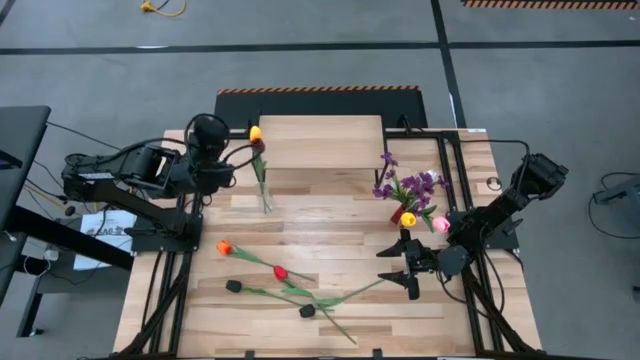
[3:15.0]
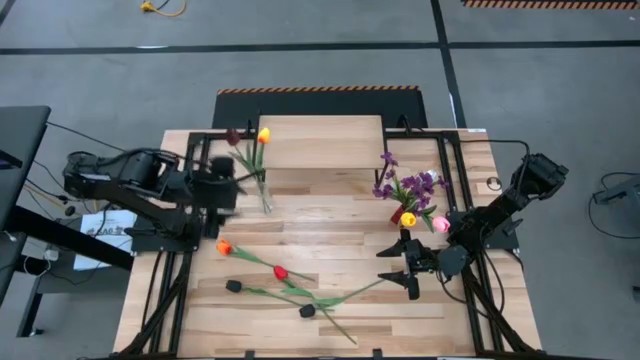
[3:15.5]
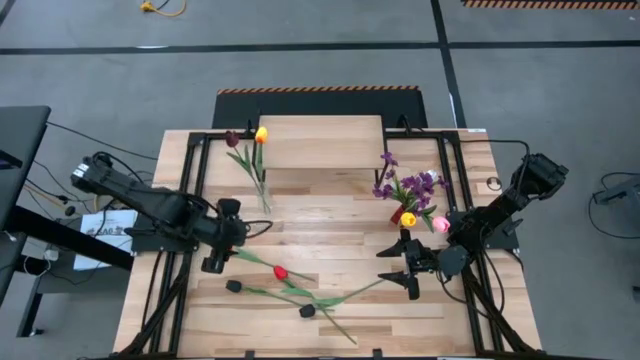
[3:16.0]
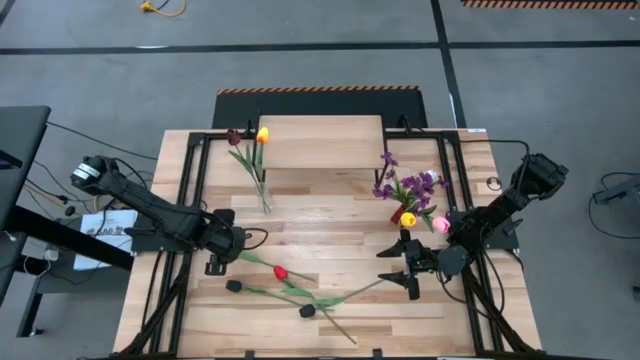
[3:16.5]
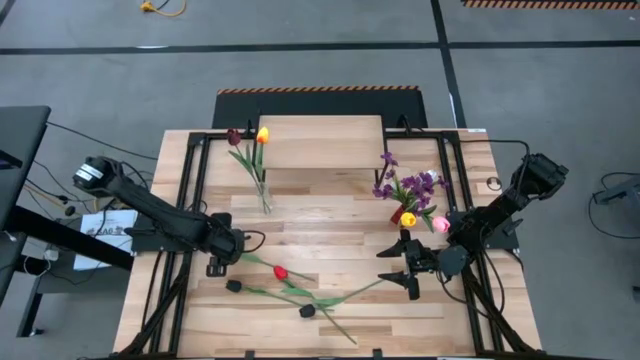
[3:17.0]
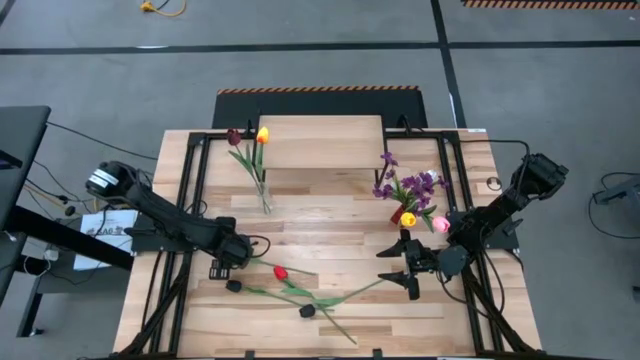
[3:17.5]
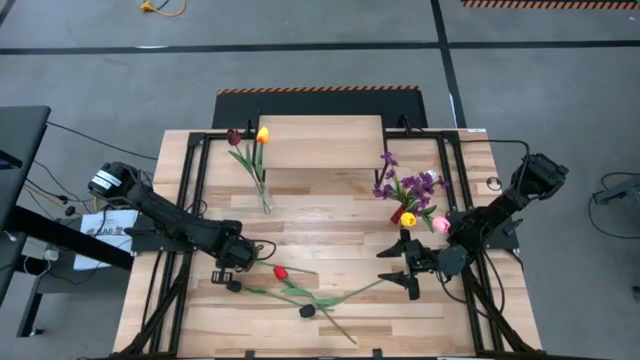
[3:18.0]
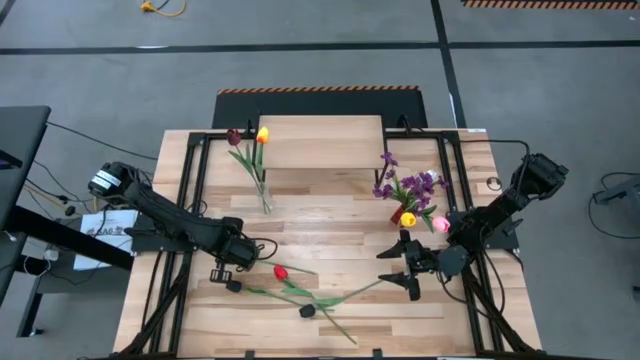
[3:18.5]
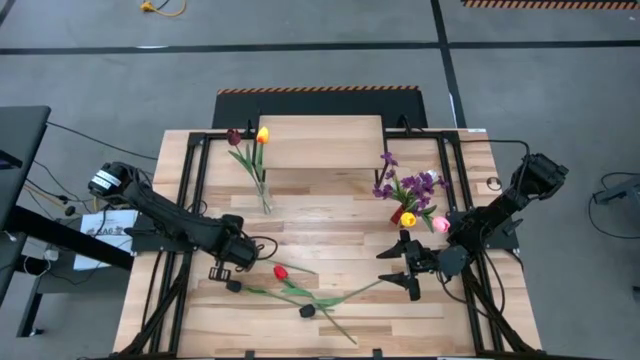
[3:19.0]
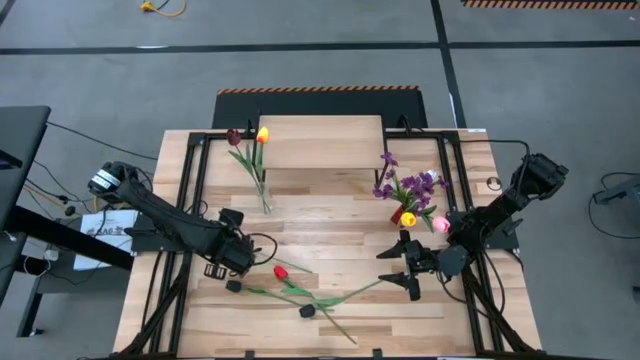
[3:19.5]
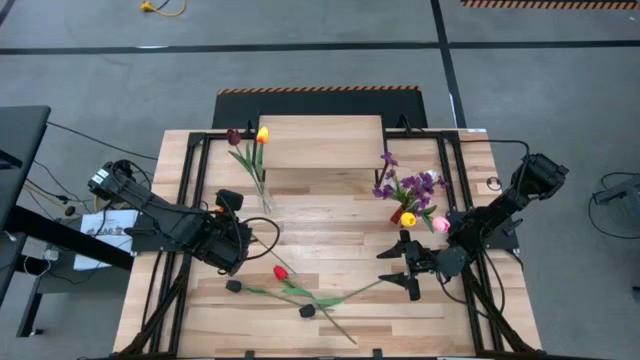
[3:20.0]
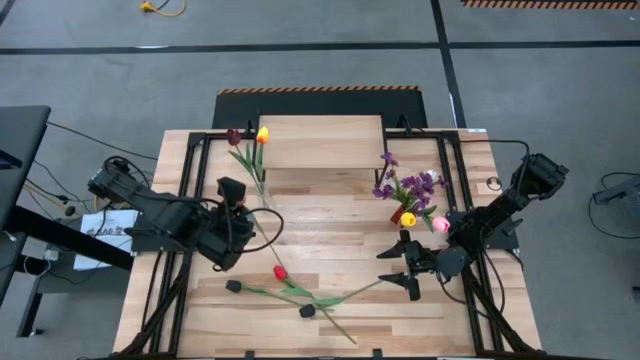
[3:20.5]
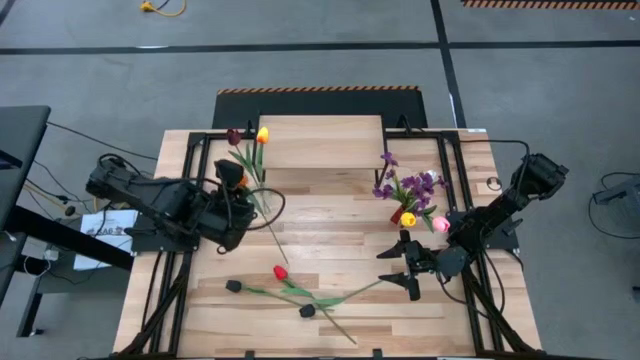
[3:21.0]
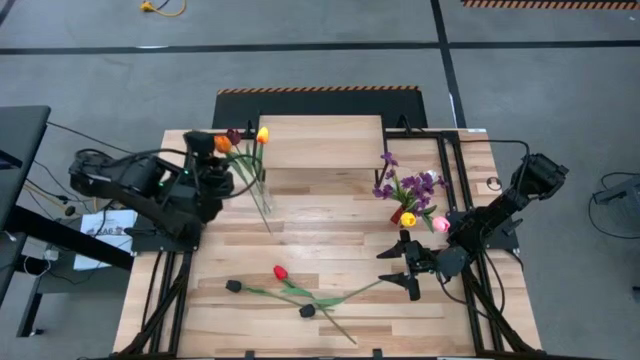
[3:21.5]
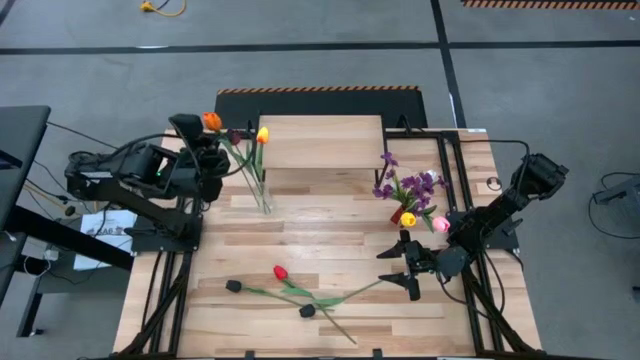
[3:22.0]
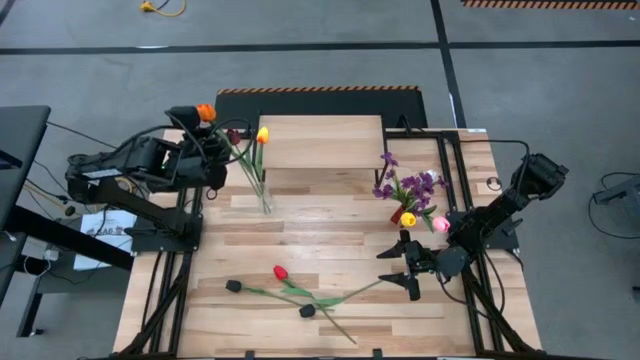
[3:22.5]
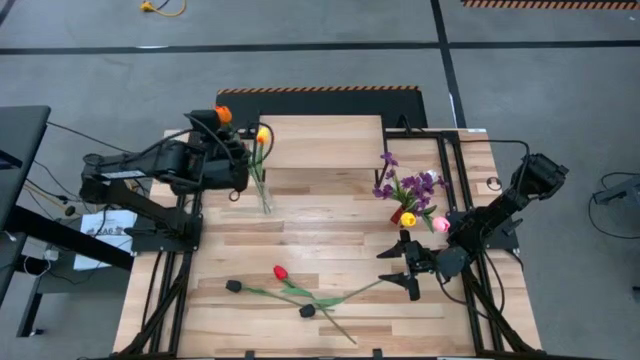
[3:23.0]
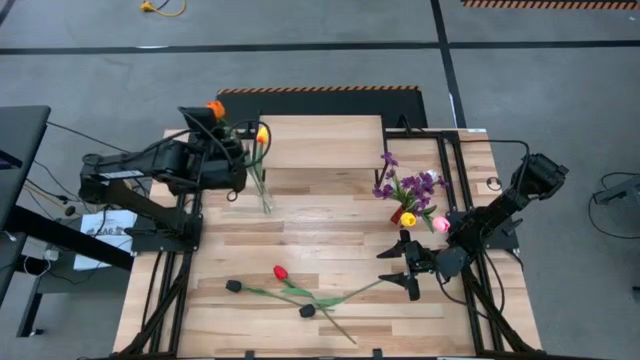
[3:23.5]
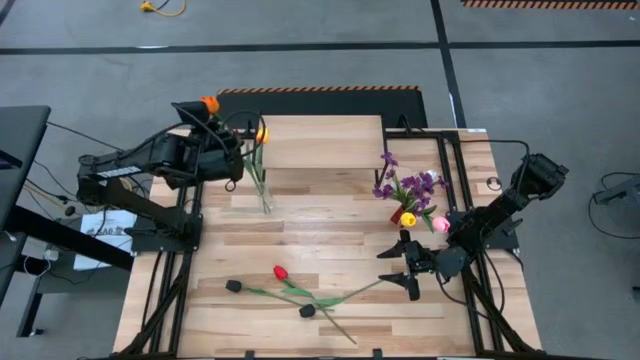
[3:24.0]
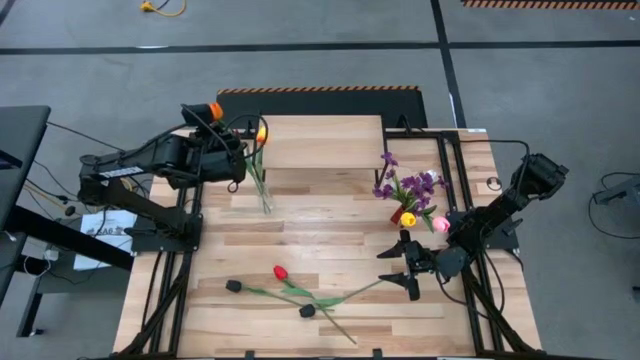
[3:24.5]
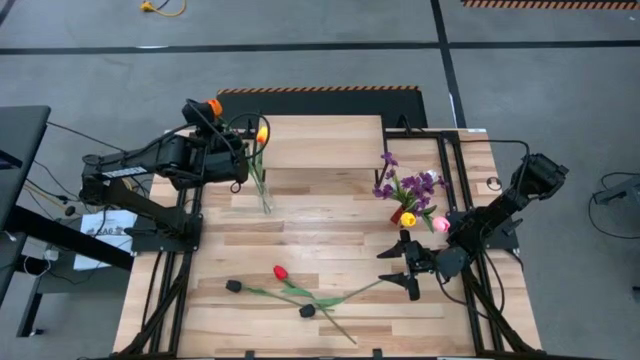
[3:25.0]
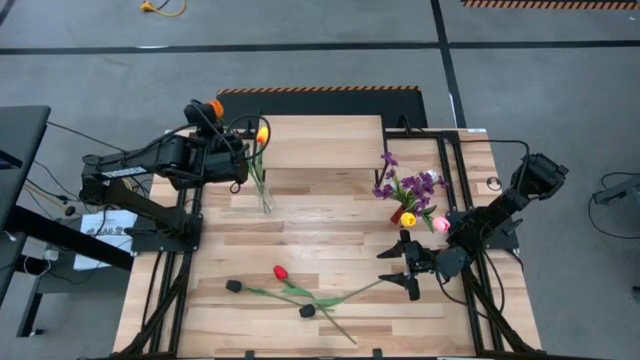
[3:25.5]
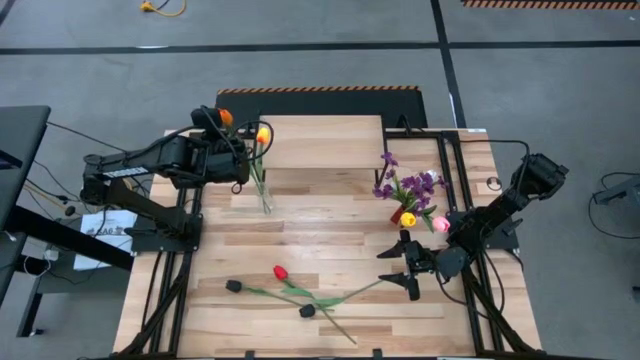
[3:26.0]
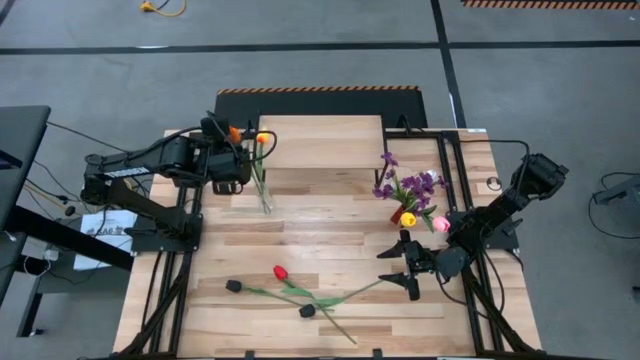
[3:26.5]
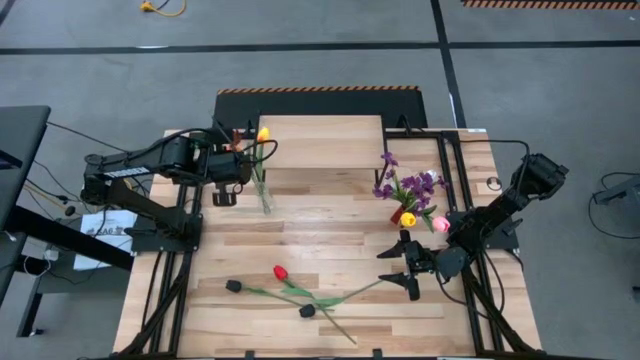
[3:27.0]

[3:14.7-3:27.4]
Task: Pick and place flowers into a vace then onto a shelf
Put the orange flower into the transparent vase

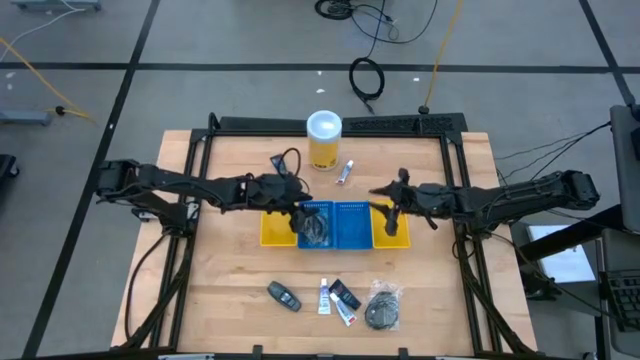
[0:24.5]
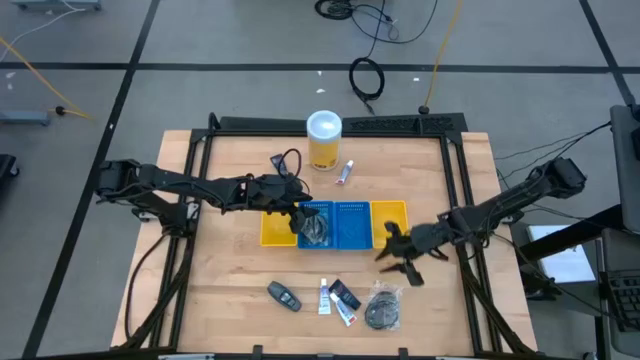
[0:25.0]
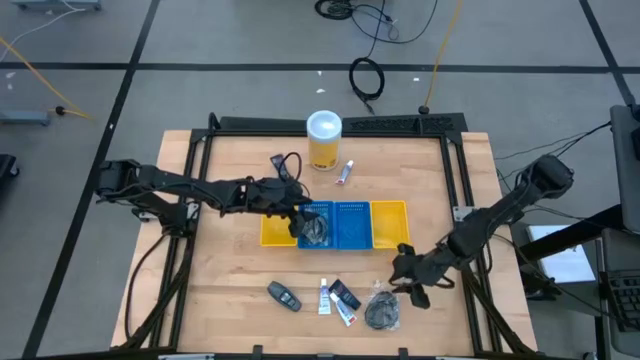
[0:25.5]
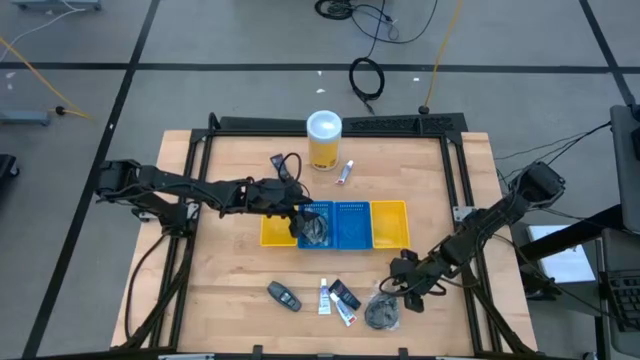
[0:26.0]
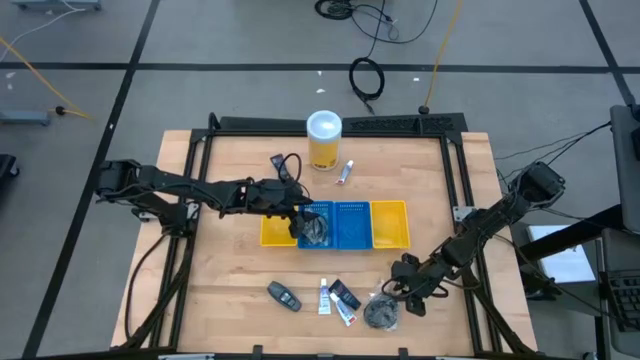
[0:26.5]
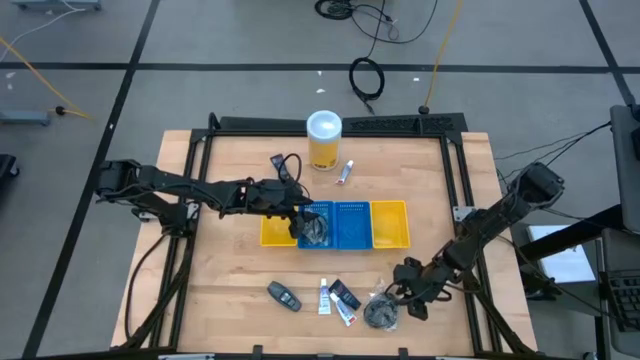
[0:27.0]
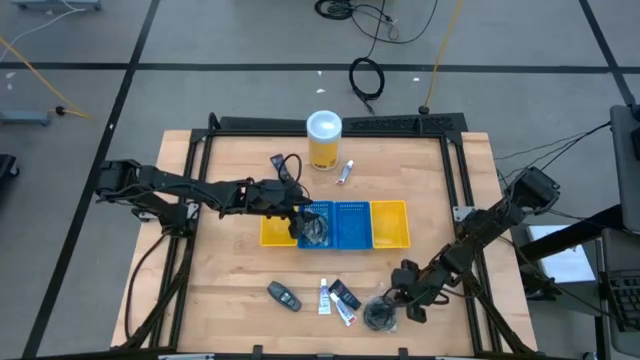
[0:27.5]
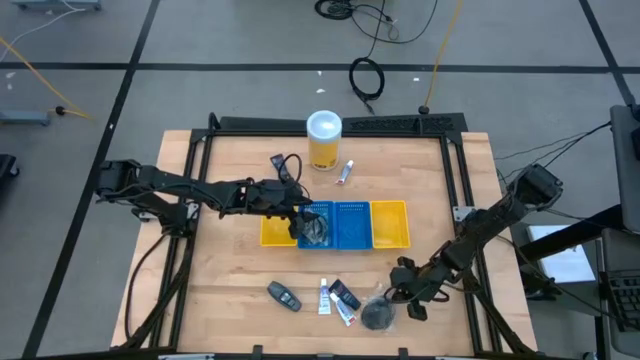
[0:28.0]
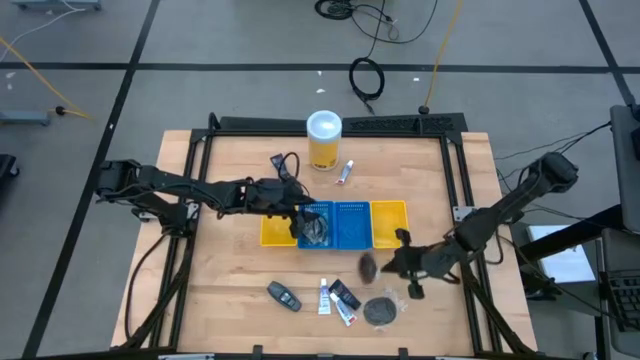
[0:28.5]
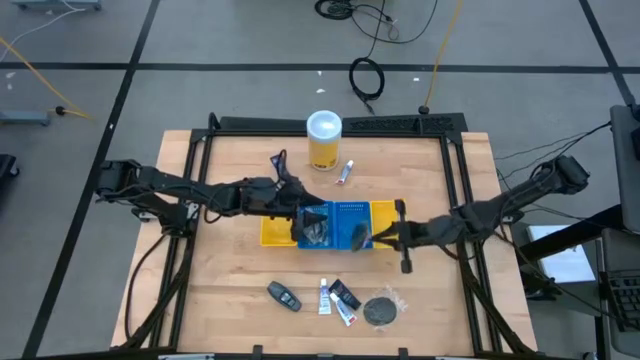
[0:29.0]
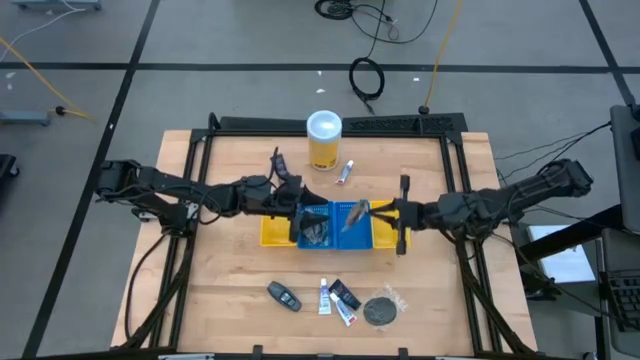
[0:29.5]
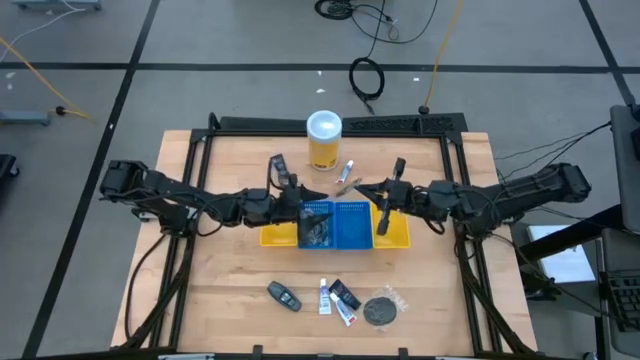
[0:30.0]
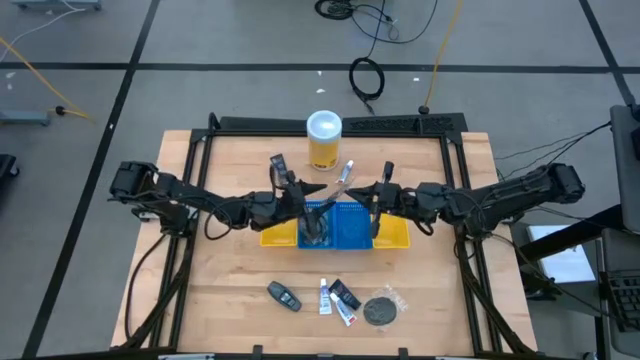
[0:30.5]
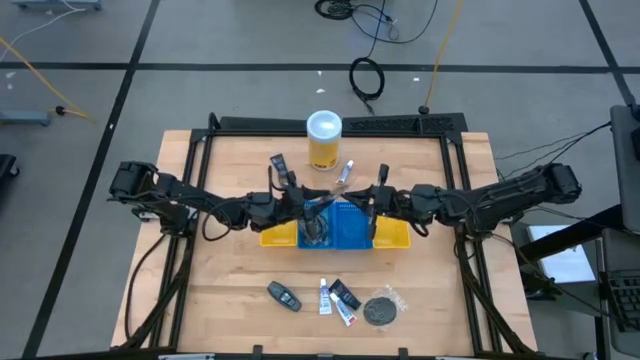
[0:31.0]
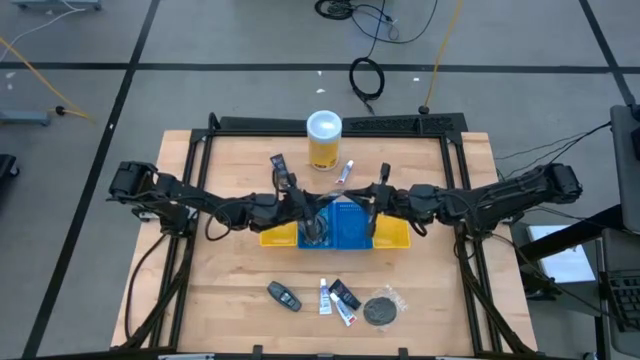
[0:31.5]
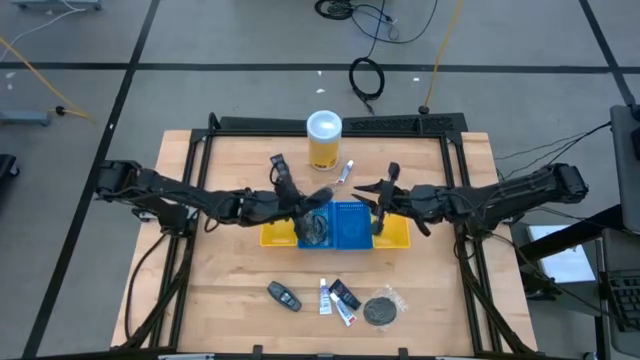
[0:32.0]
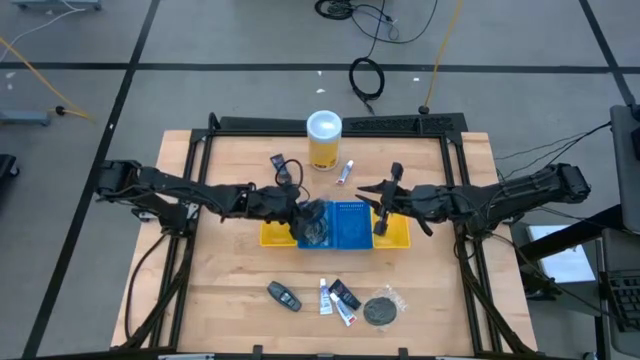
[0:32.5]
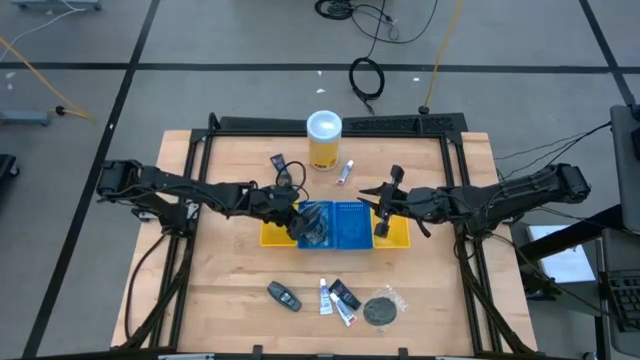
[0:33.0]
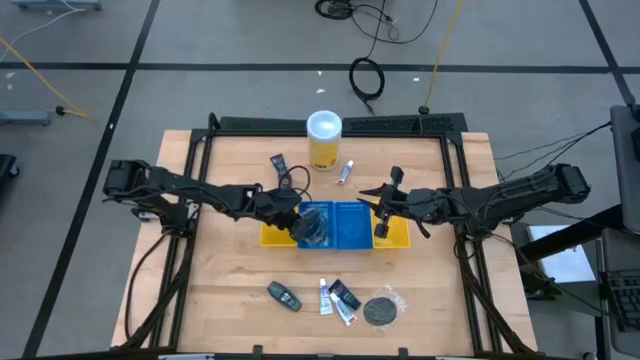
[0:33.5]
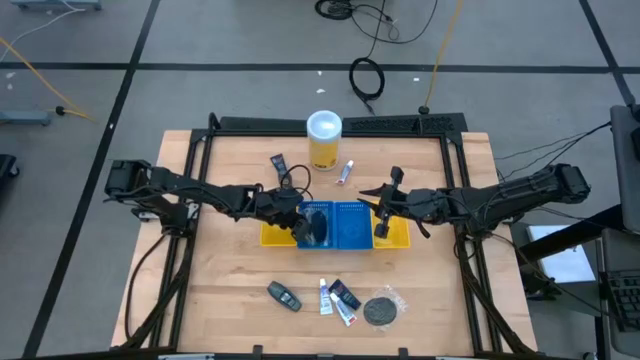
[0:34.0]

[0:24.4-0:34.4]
Task: Pick & Place Travel size toiletries
Put the black comb into the left blue bin
